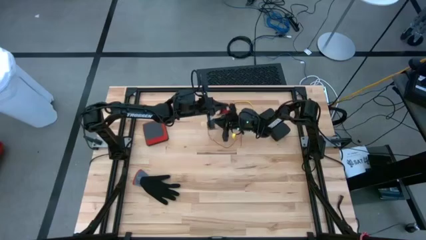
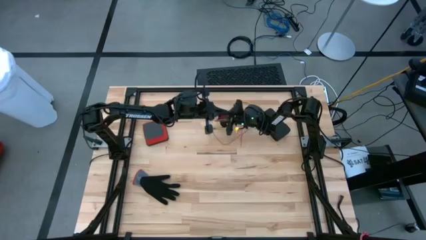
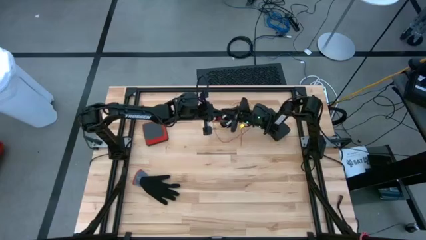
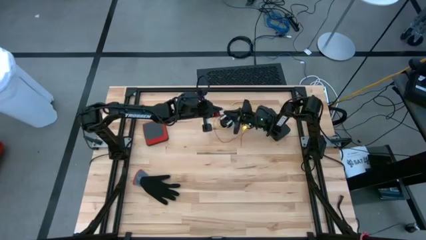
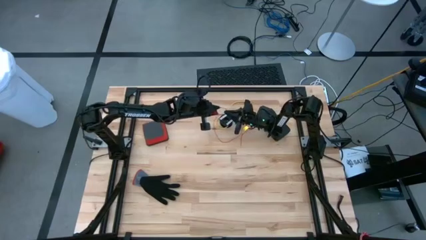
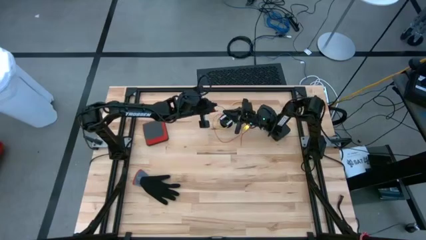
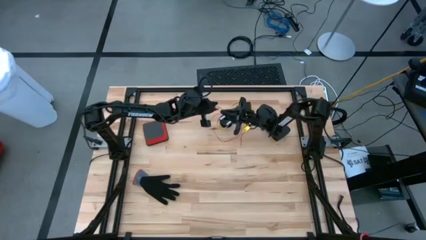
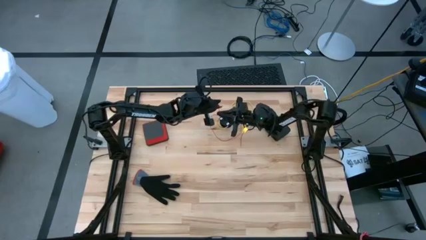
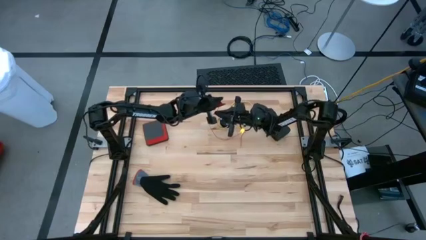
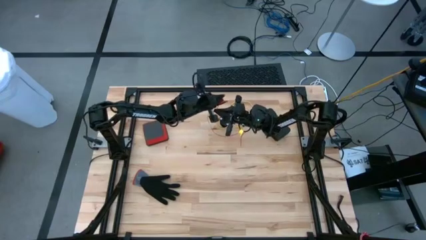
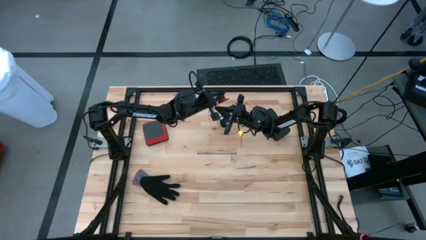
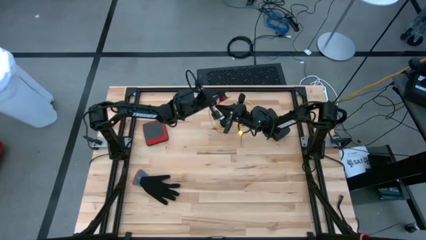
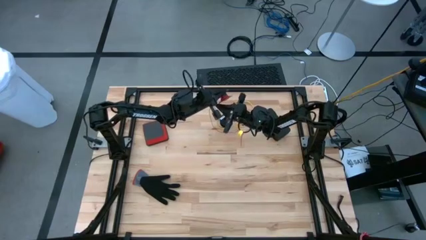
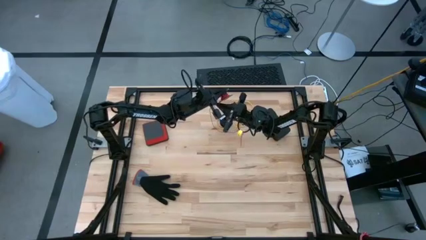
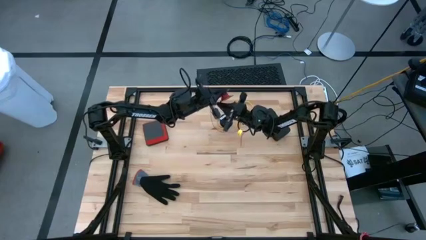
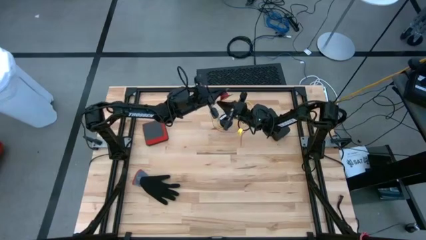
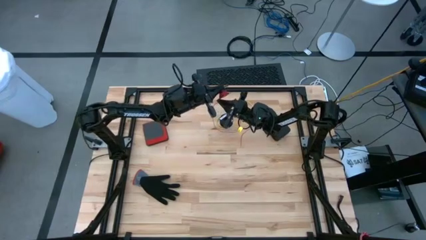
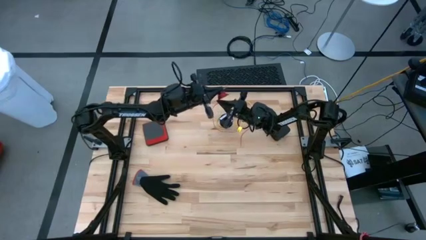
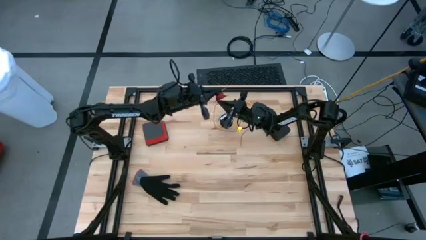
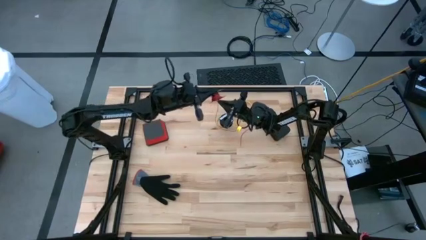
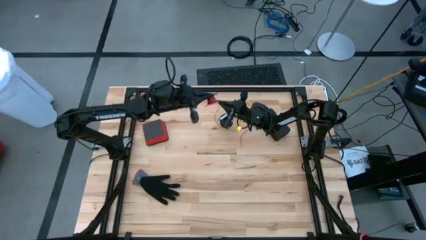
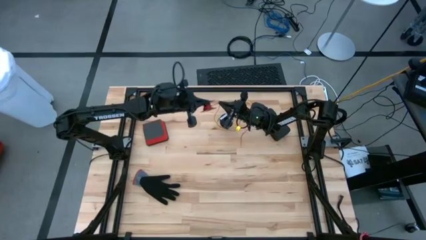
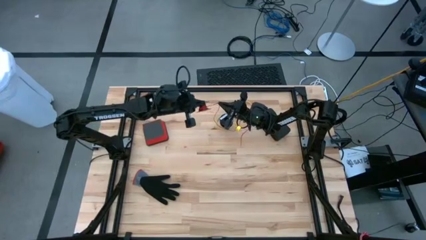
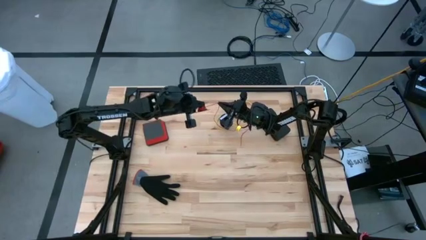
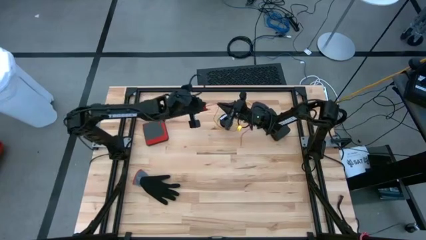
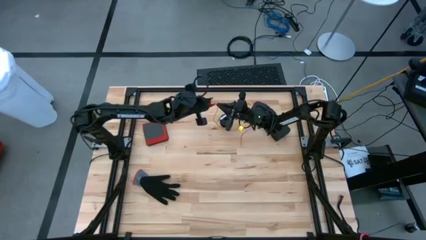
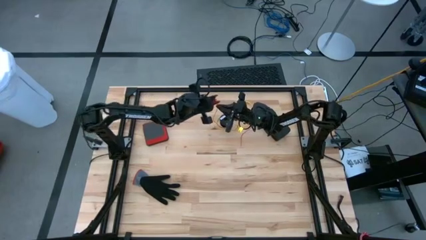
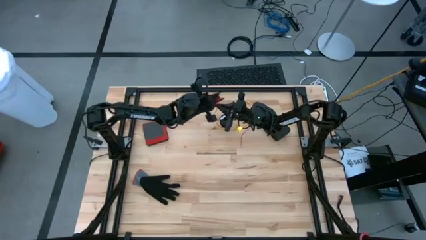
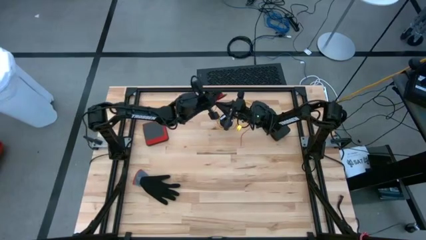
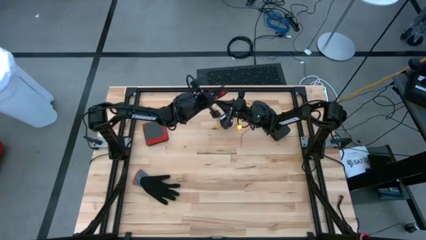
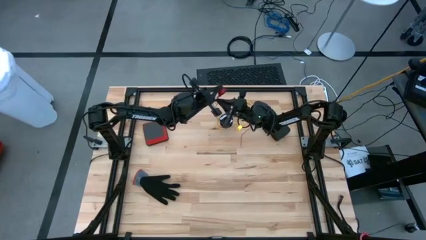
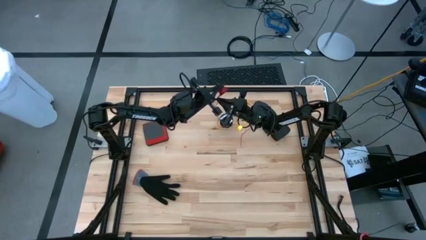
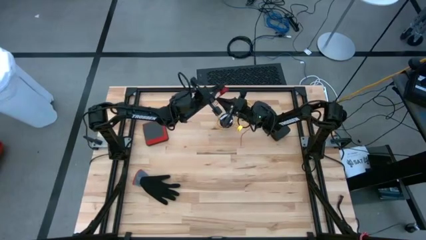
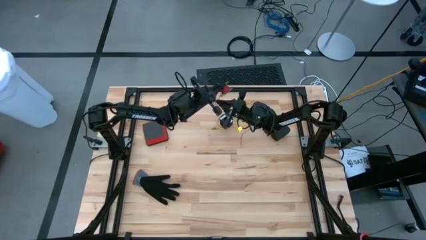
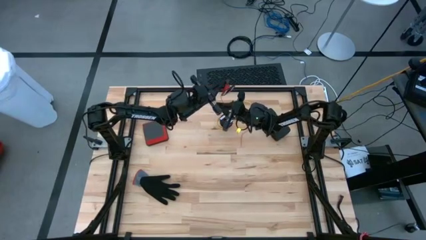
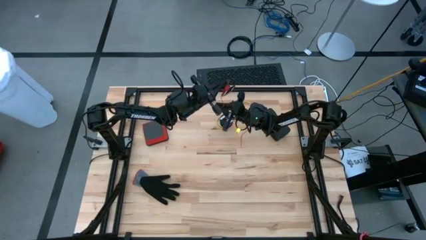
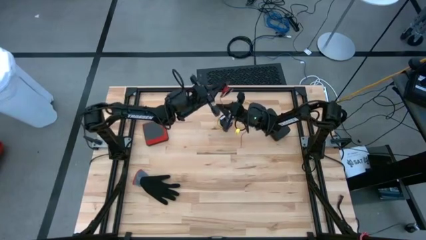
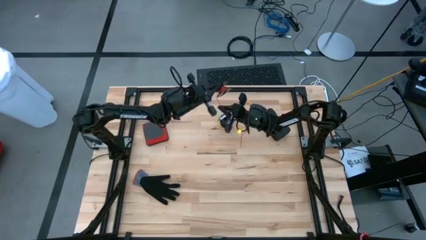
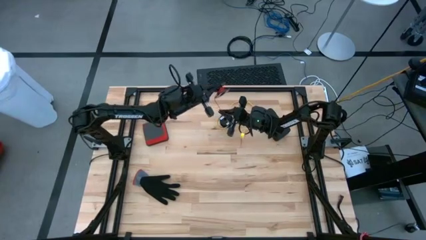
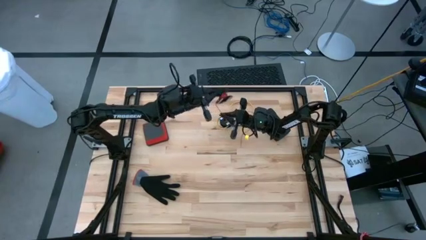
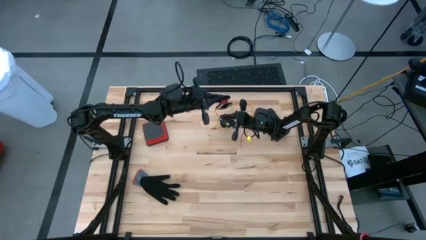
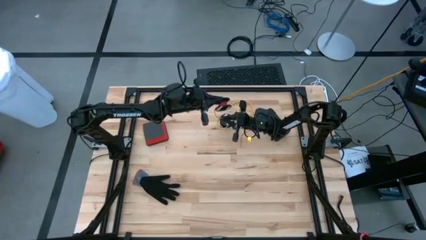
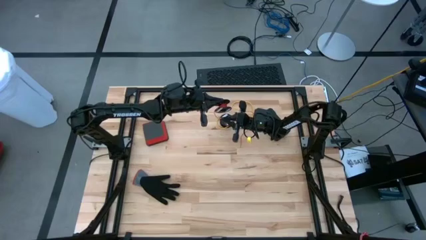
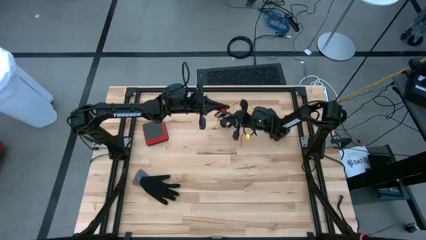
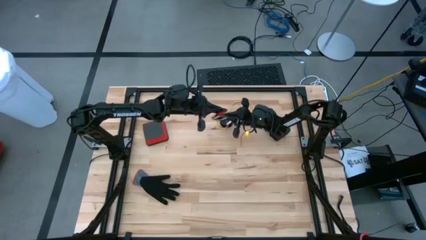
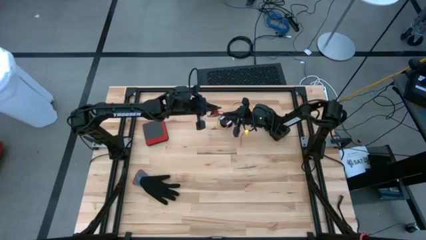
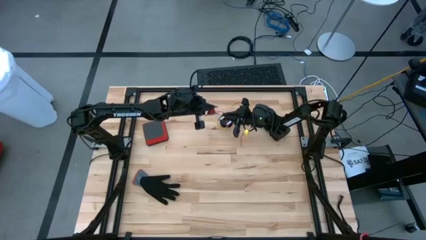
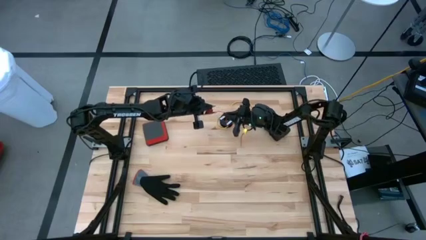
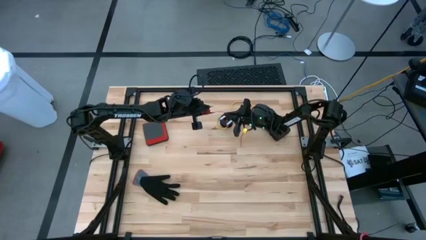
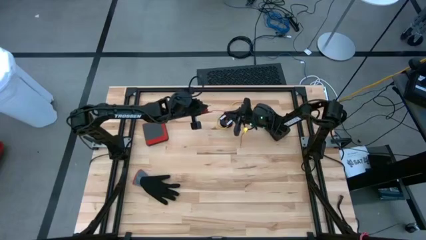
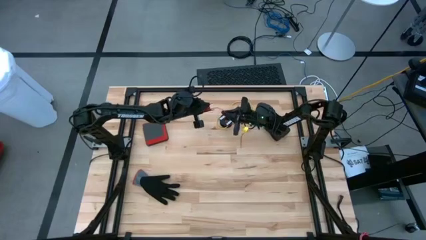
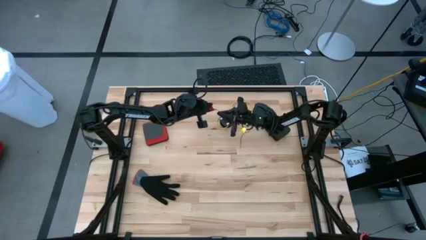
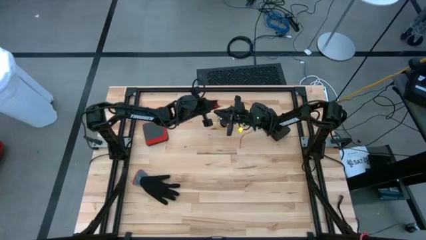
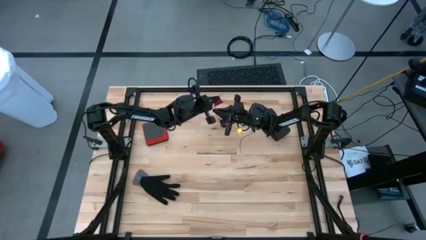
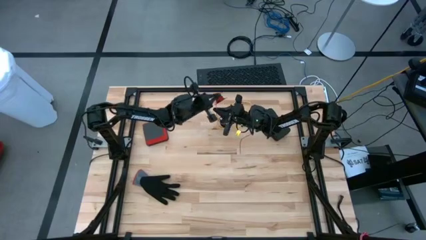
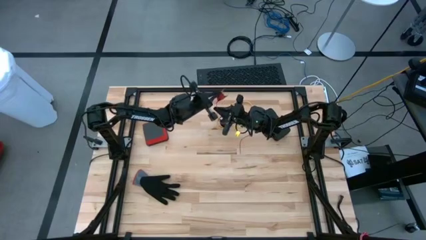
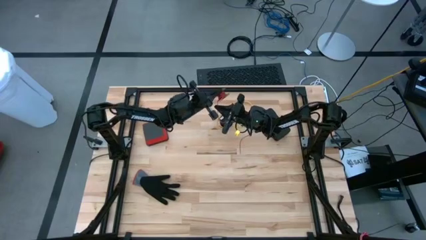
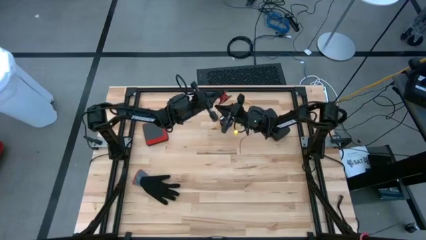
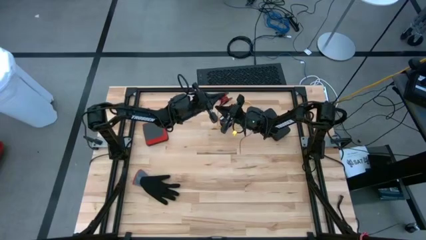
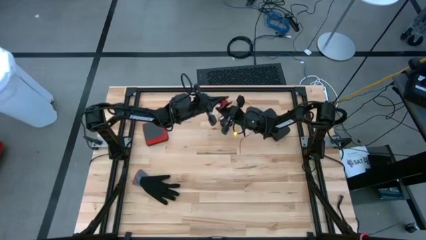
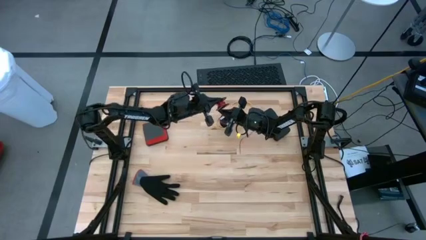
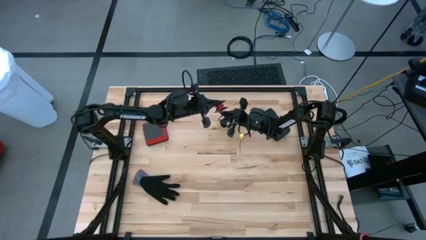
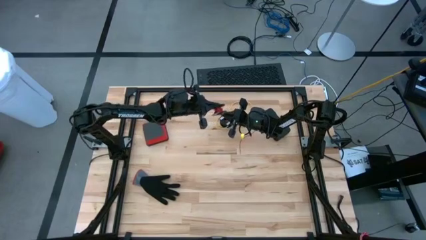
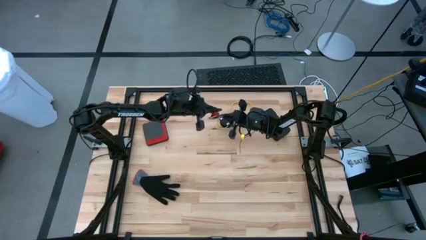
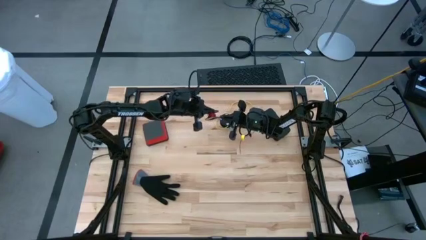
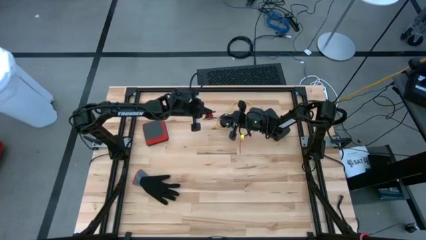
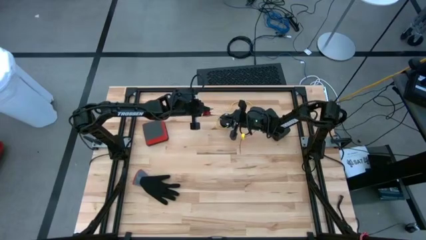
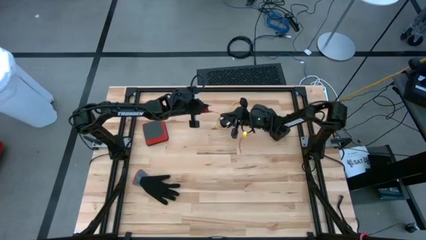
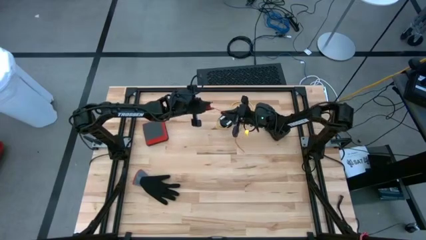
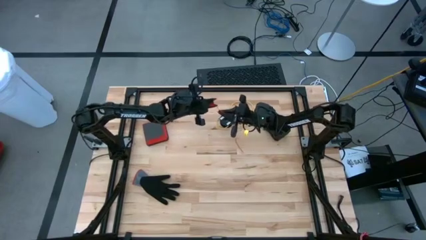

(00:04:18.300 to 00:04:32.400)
Task: Coil cords
Coil the red wire into the spool

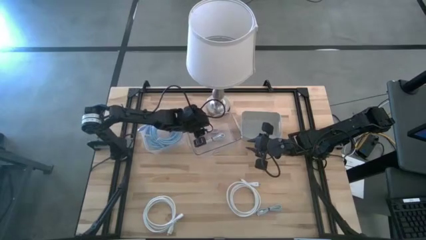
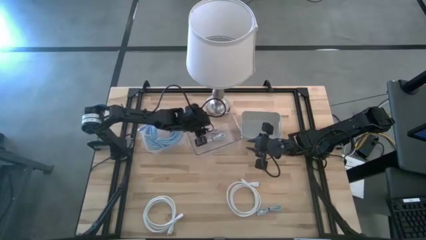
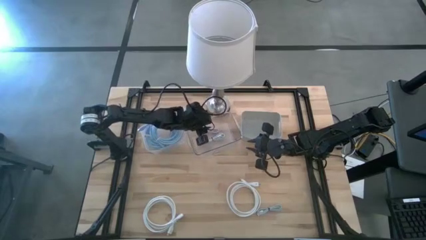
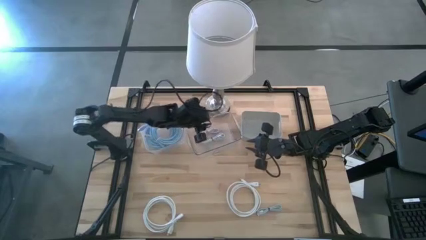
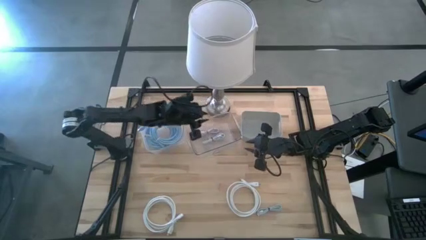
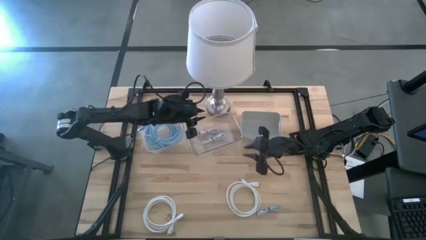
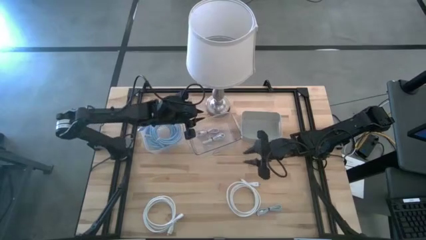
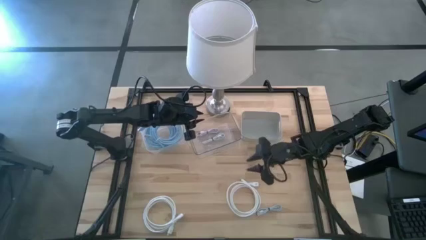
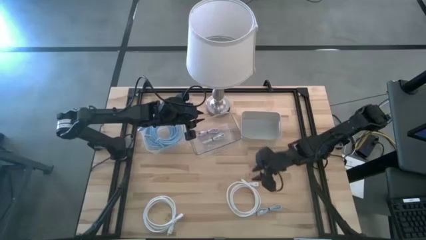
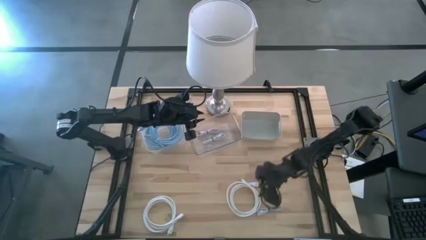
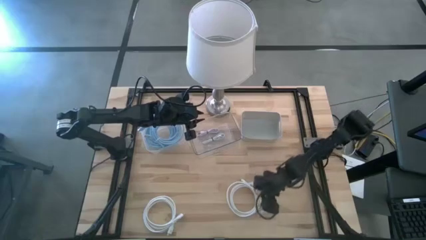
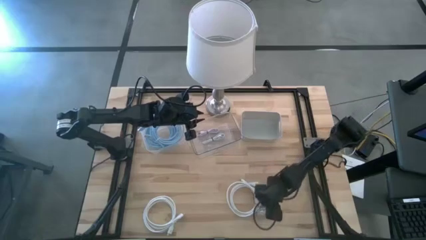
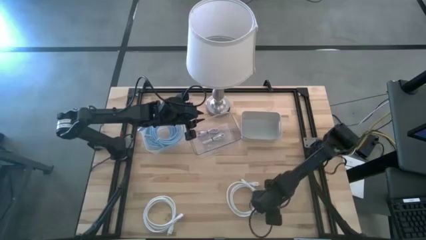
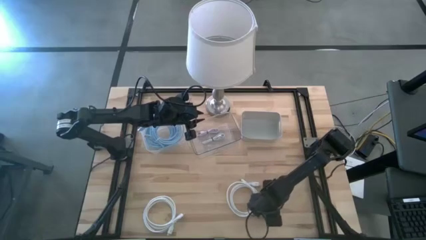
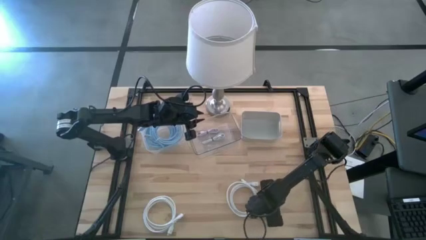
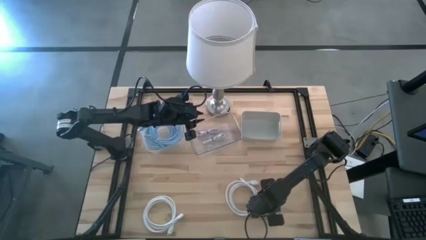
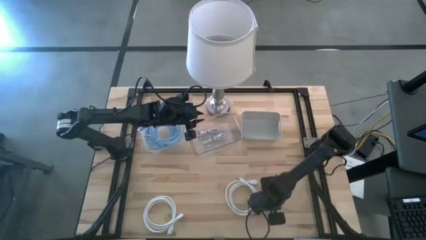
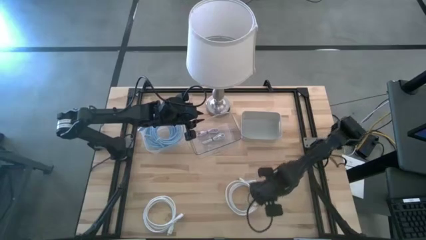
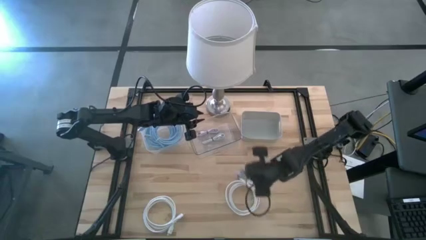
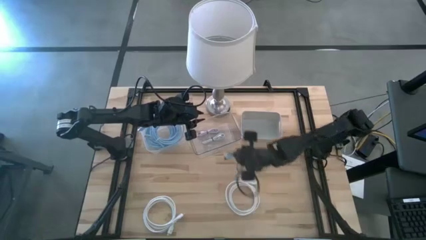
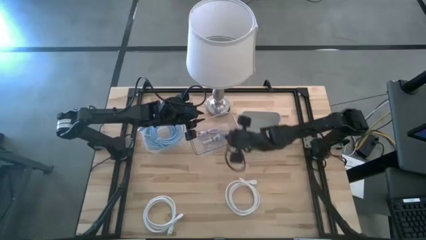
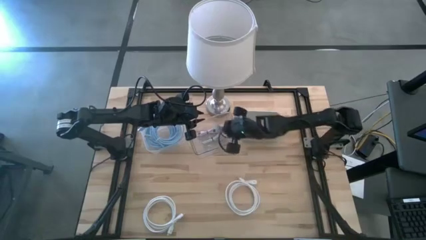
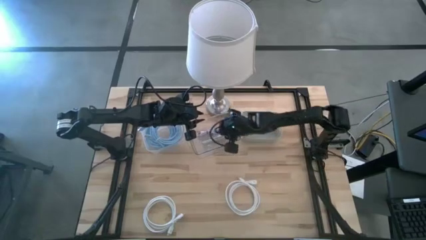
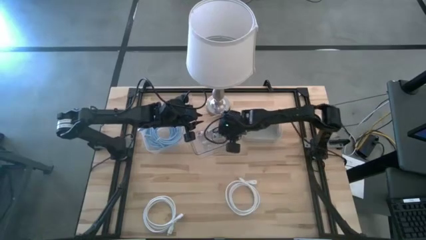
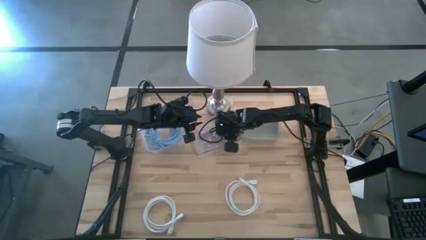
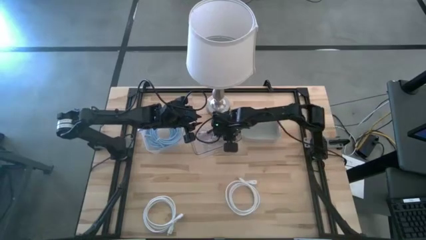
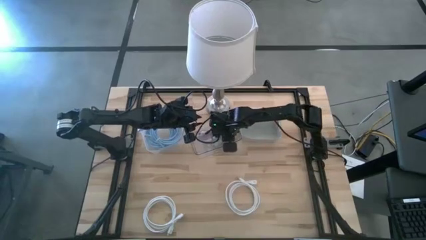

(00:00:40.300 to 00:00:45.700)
Task: Pick & Place USB Port
Put the blue usb cable into the transparent bin
